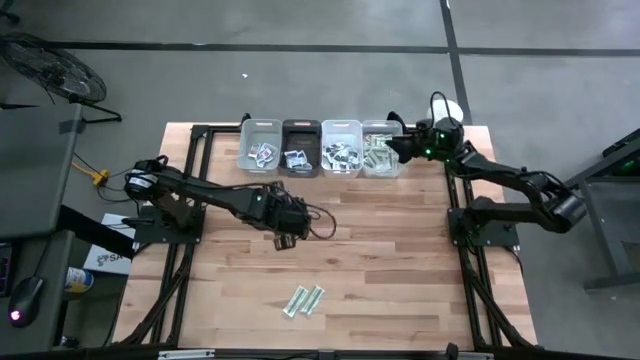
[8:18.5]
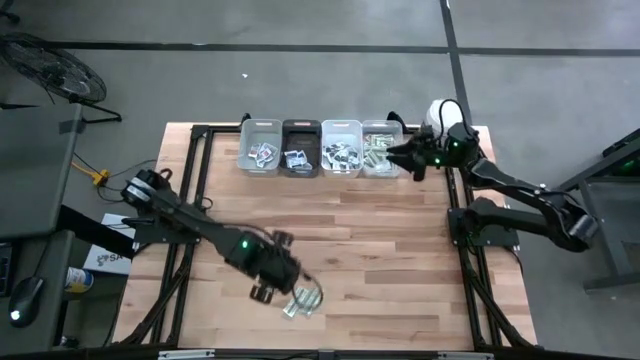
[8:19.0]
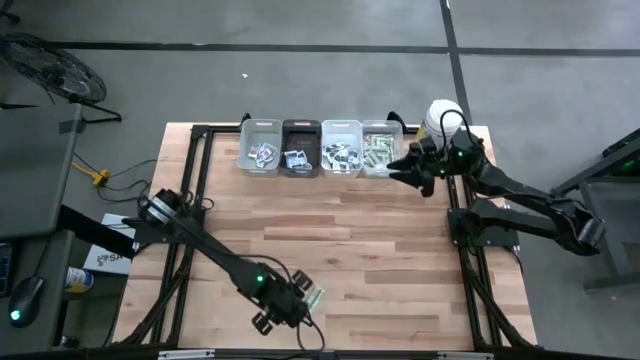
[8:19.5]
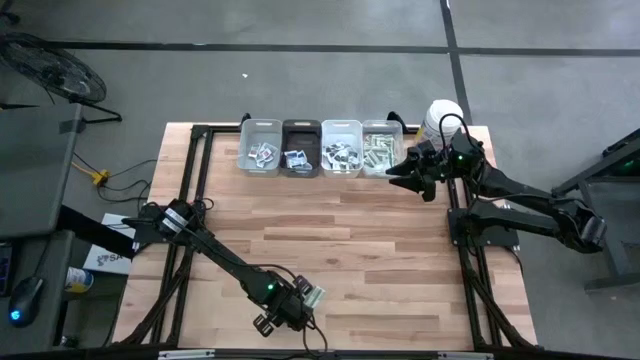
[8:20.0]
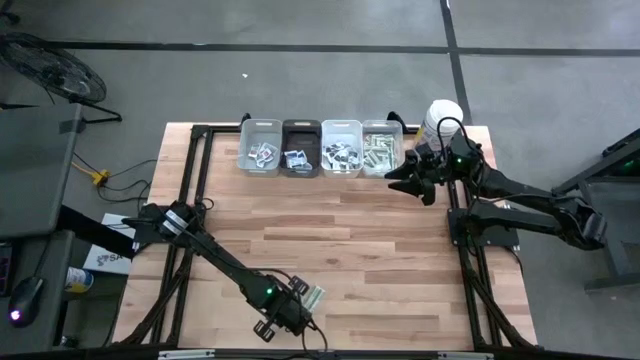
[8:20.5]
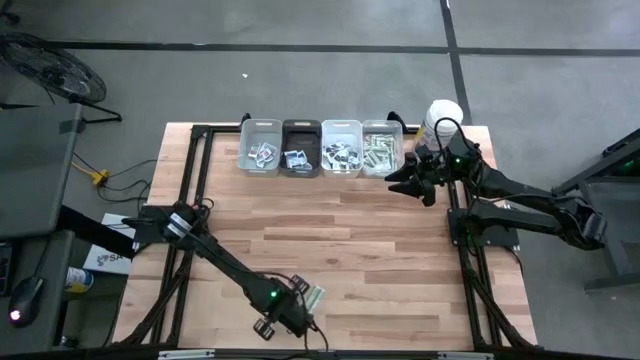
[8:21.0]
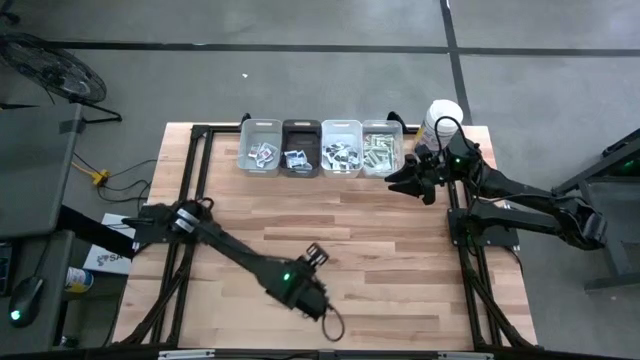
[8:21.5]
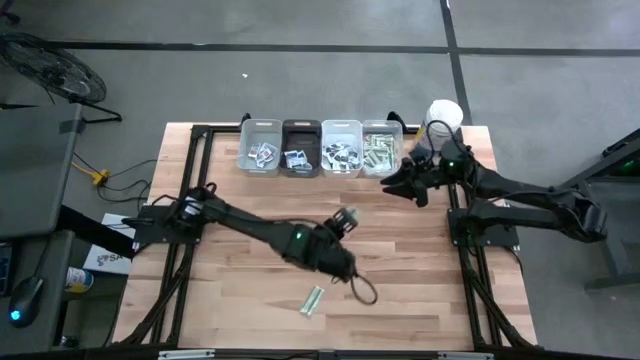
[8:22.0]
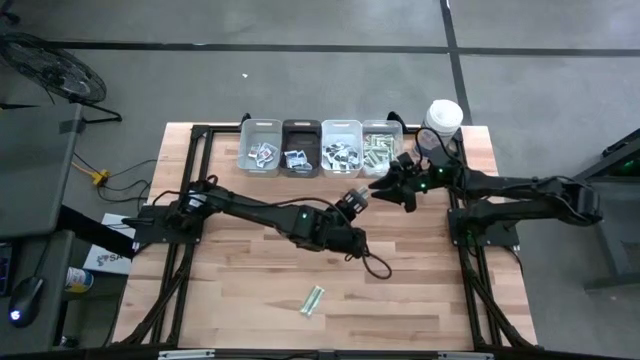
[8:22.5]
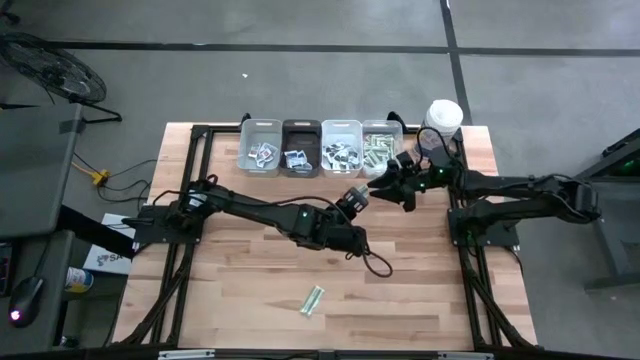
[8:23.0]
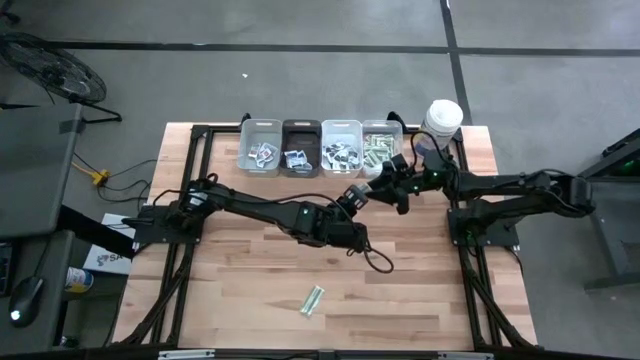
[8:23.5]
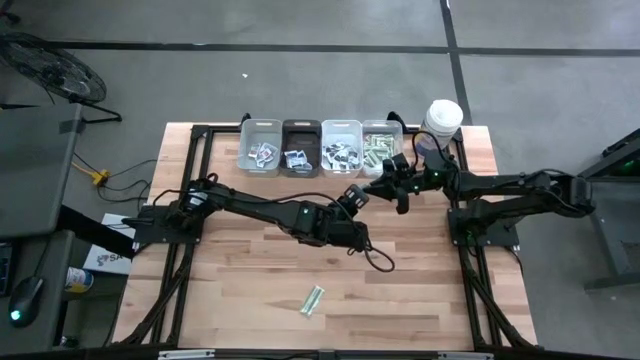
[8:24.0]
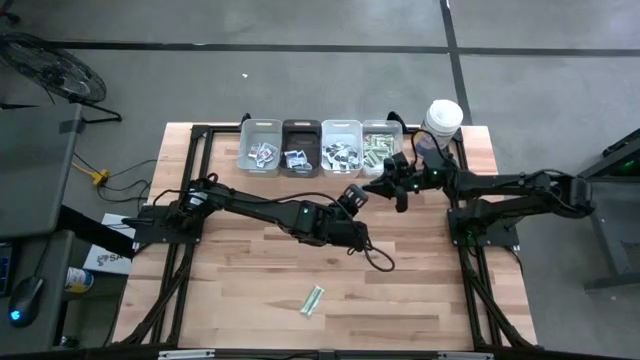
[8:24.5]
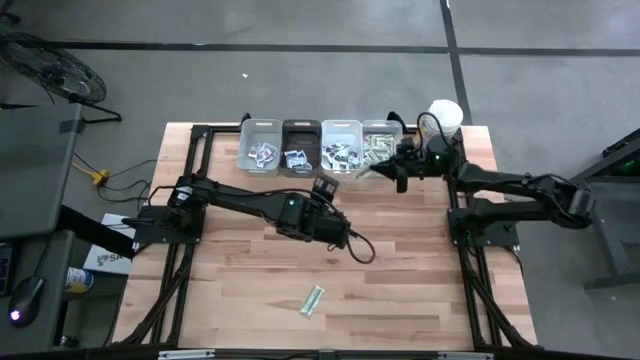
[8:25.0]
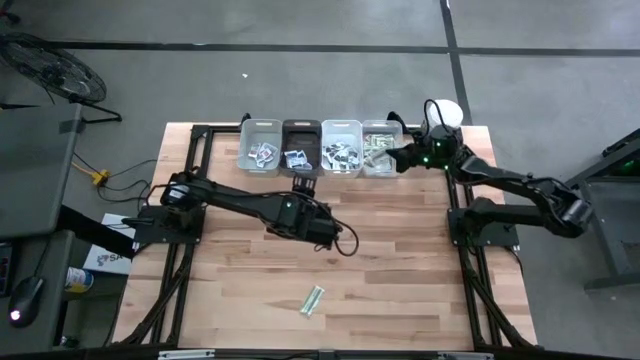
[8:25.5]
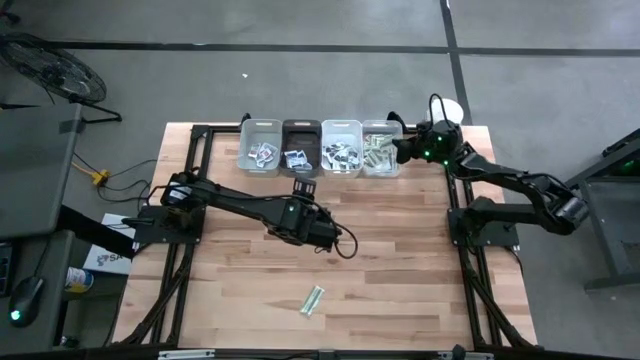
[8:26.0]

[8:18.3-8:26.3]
Task: Pick & Place First Aid Supplies
Put the green bandage into the transparent bin

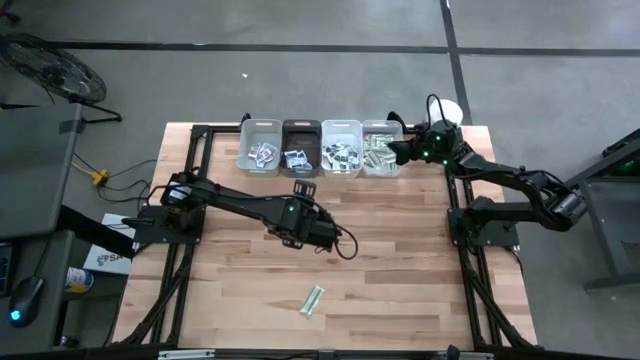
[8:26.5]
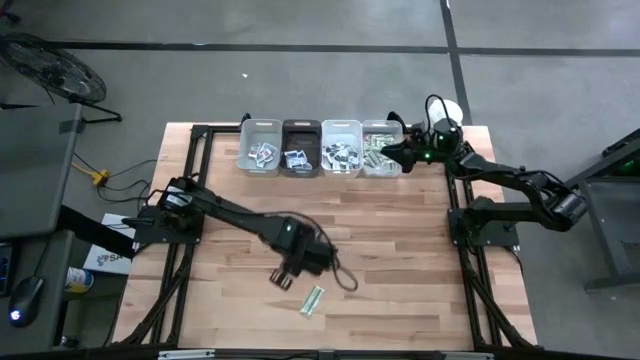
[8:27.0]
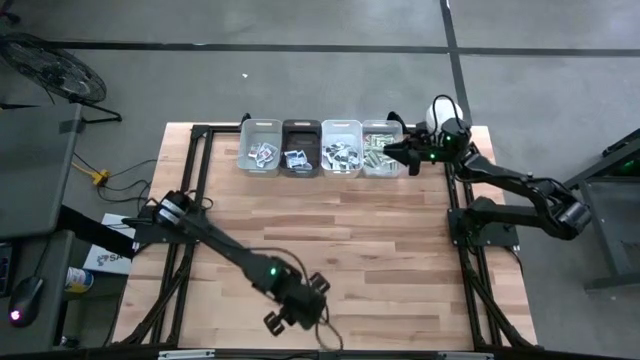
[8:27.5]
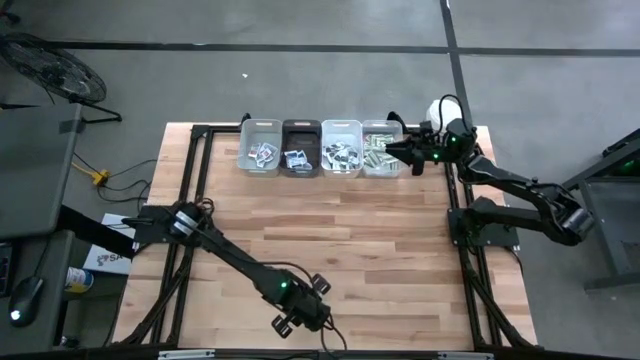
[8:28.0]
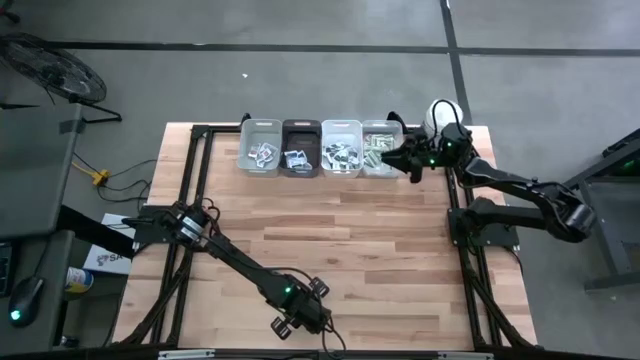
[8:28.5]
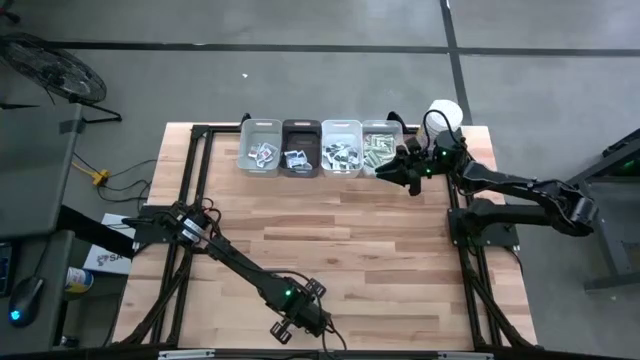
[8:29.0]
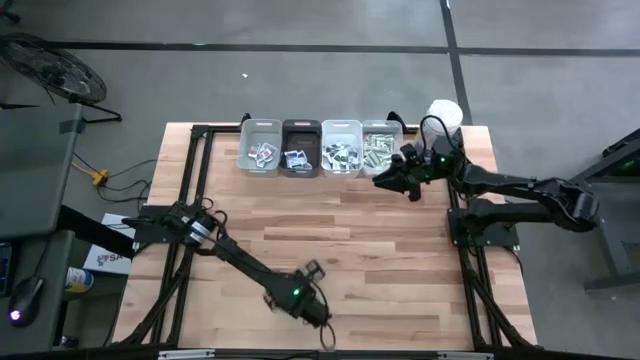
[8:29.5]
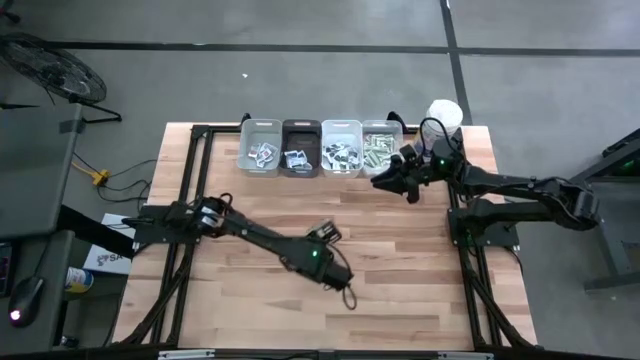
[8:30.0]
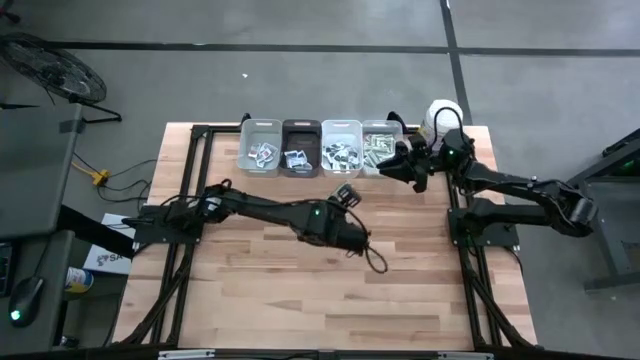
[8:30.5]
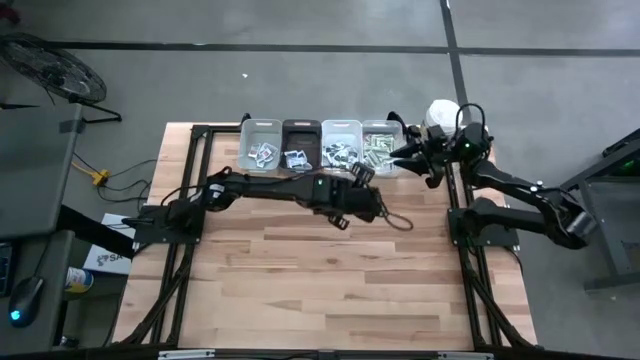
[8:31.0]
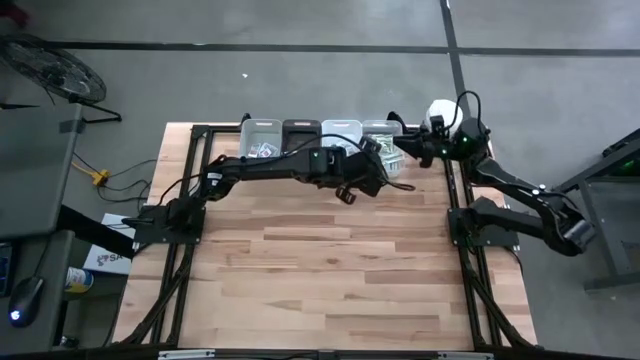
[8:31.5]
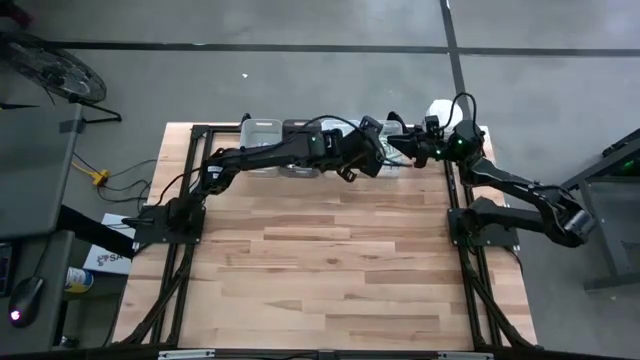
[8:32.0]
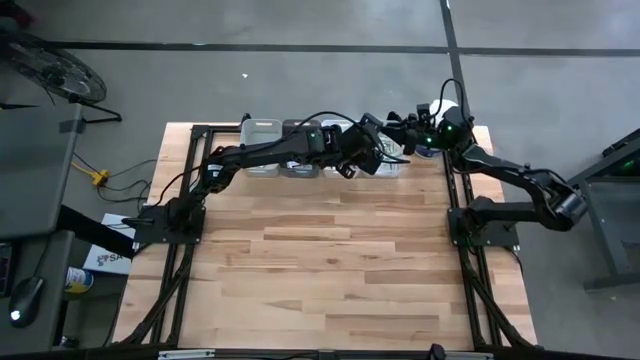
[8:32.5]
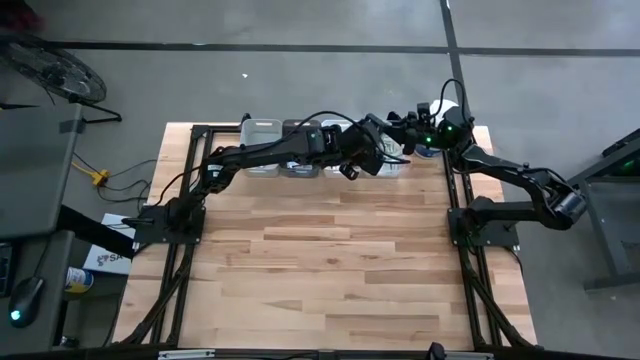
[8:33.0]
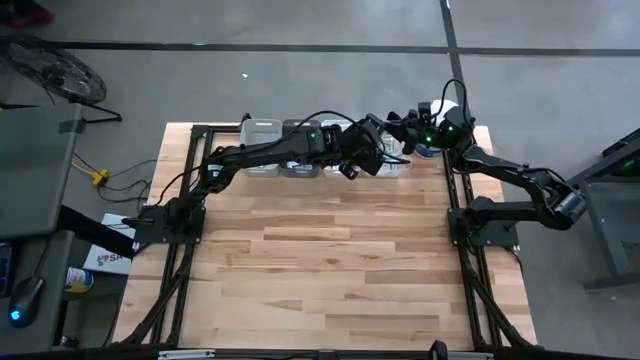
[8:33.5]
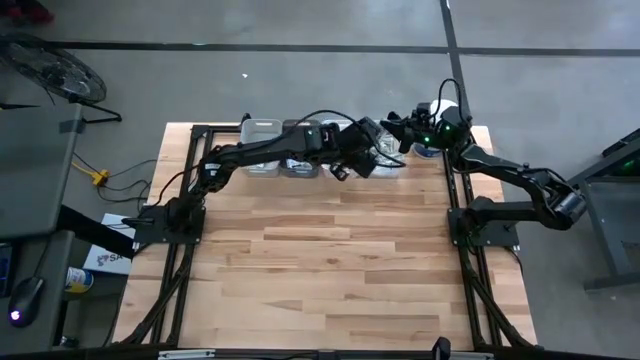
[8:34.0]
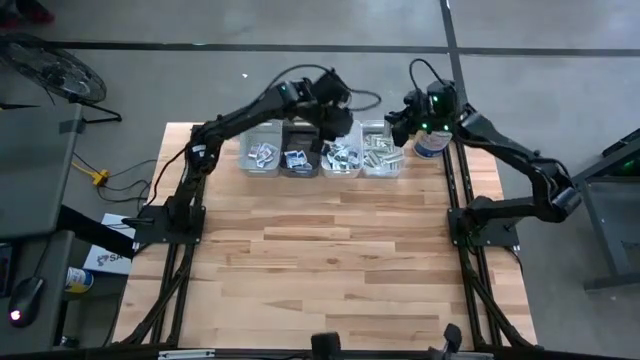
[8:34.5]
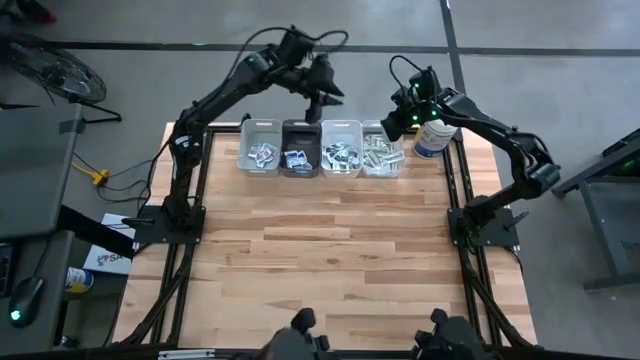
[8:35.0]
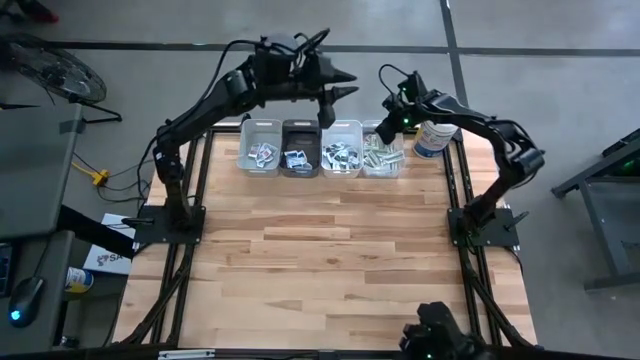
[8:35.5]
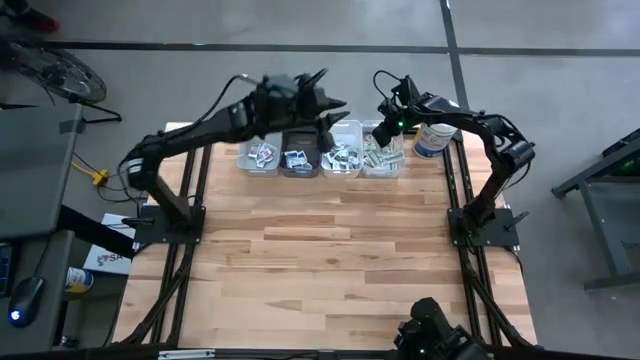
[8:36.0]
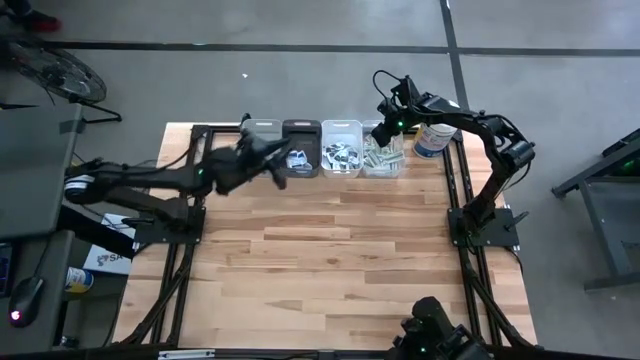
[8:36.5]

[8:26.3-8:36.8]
Put the green bandage into the transparent bin

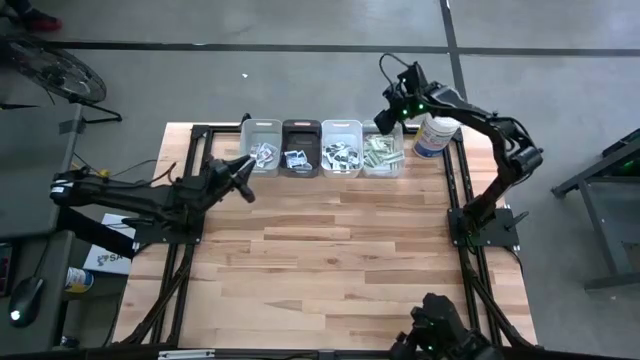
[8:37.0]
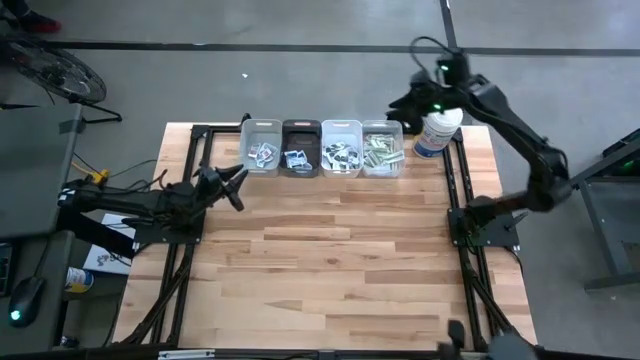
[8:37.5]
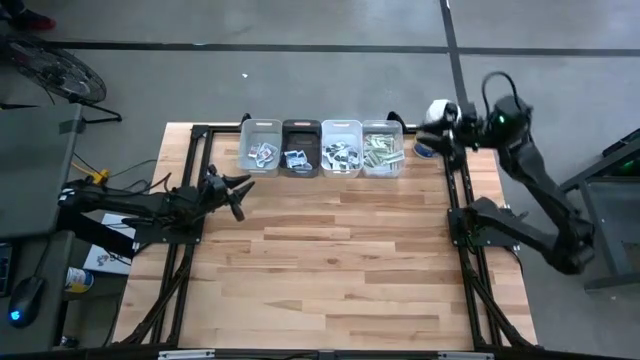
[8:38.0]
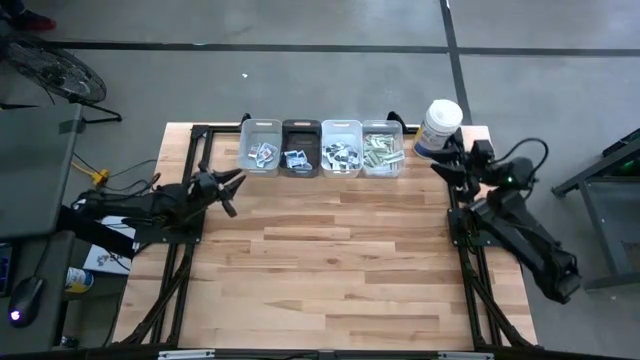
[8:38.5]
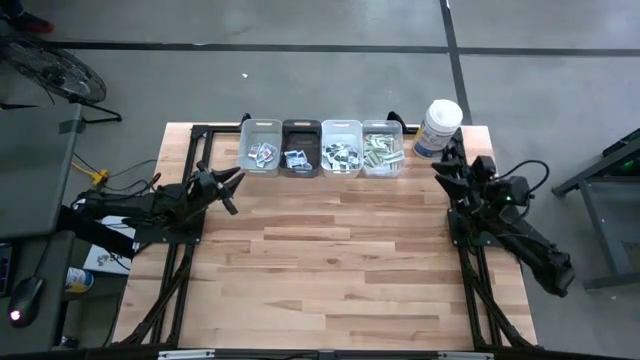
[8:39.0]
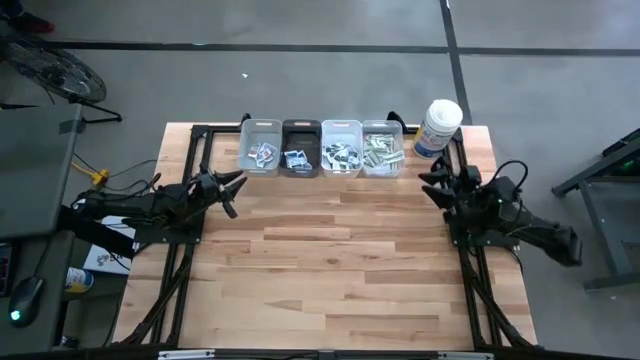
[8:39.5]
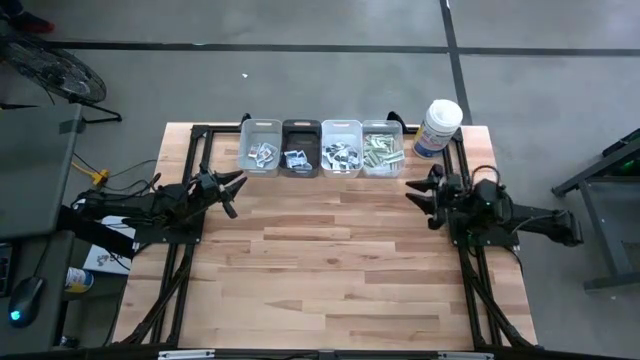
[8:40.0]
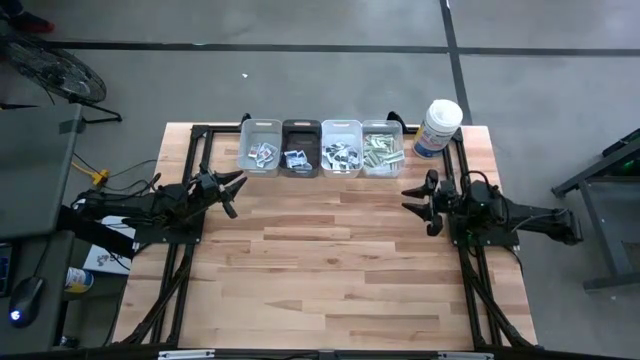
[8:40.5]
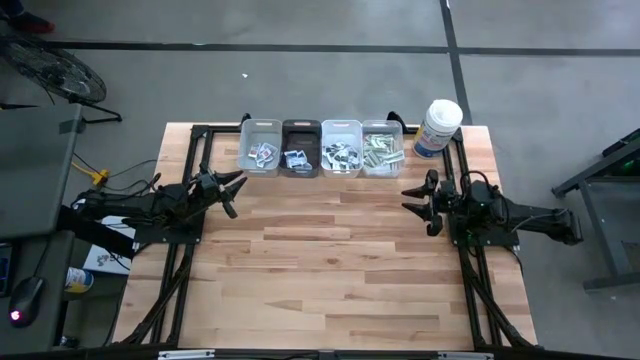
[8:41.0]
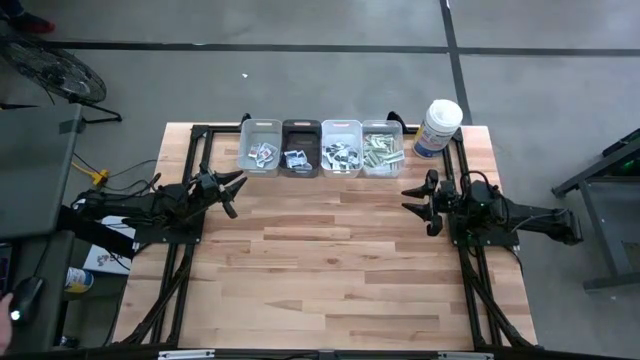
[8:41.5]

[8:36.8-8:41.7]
Return to Home Position
